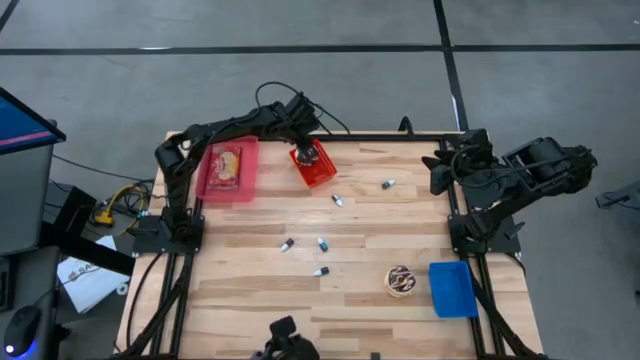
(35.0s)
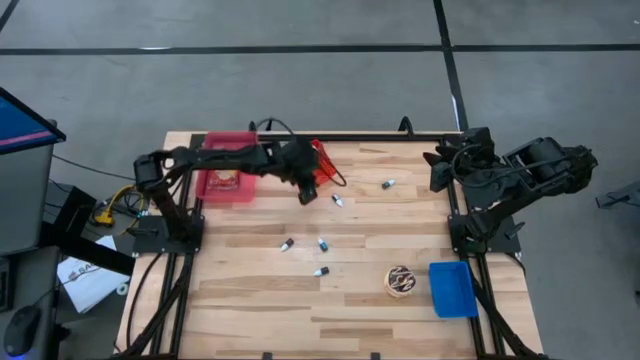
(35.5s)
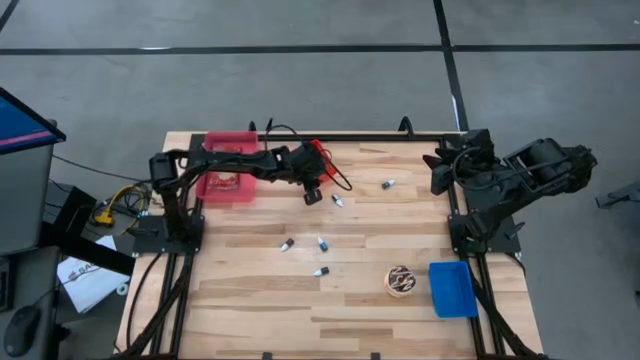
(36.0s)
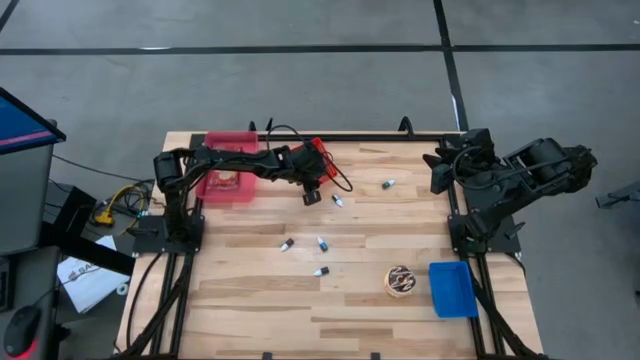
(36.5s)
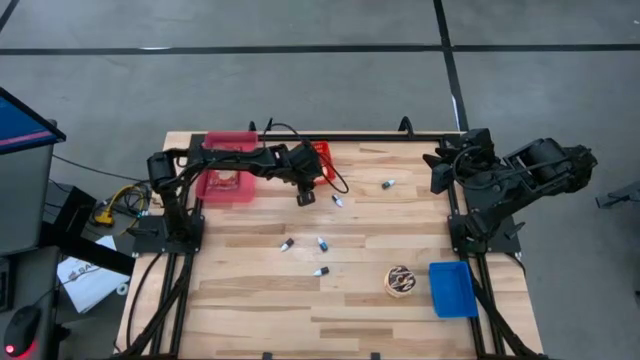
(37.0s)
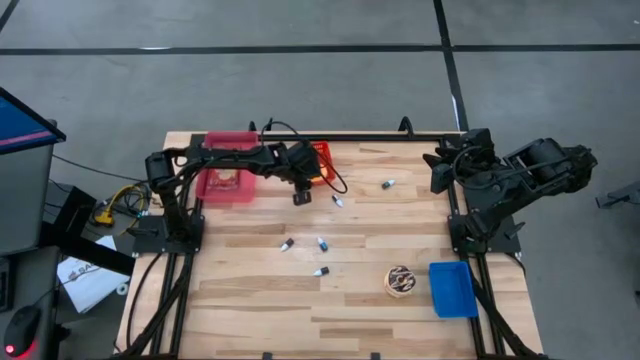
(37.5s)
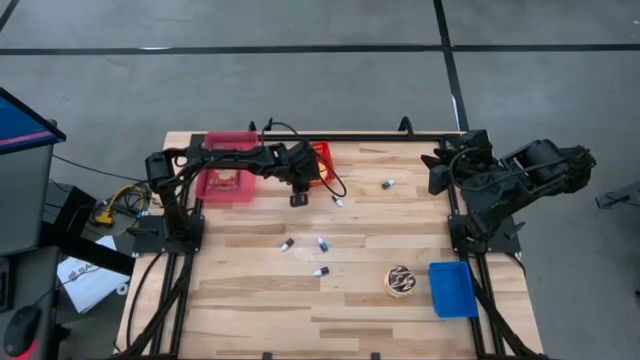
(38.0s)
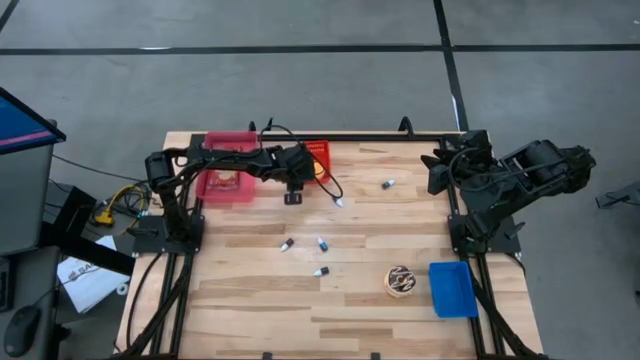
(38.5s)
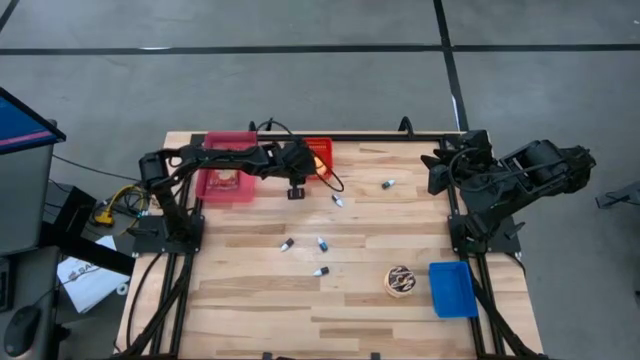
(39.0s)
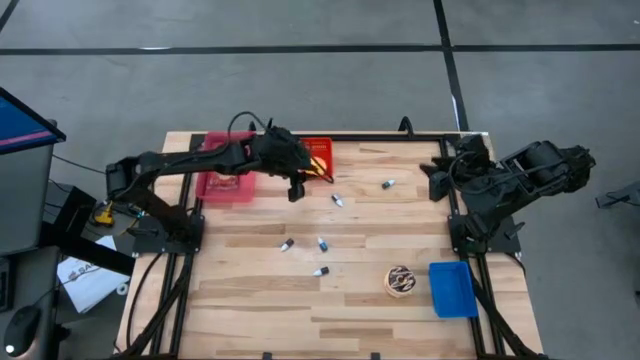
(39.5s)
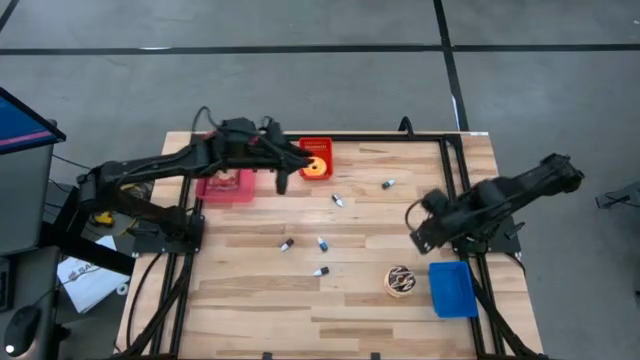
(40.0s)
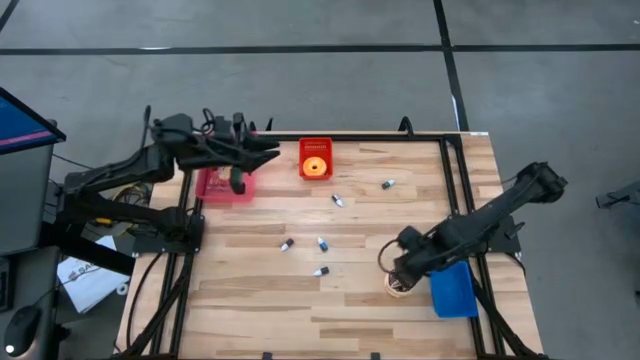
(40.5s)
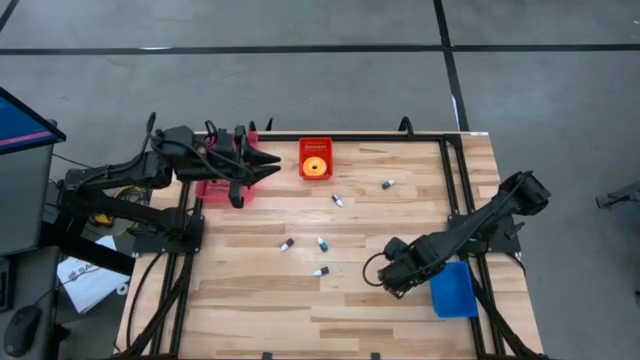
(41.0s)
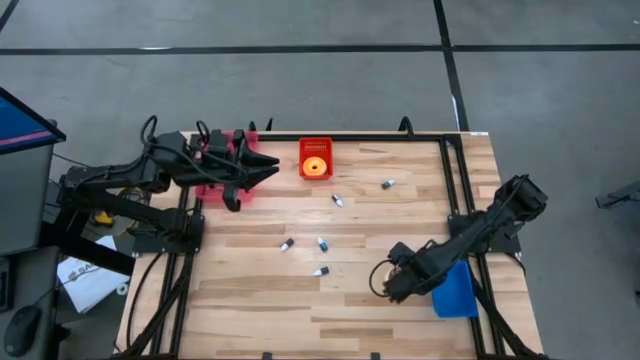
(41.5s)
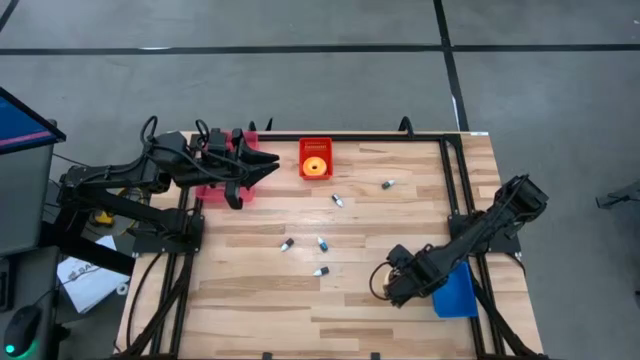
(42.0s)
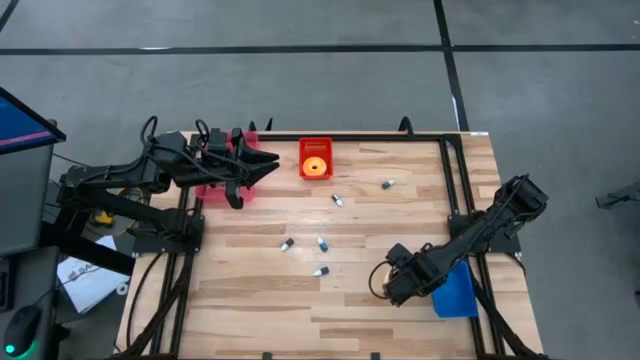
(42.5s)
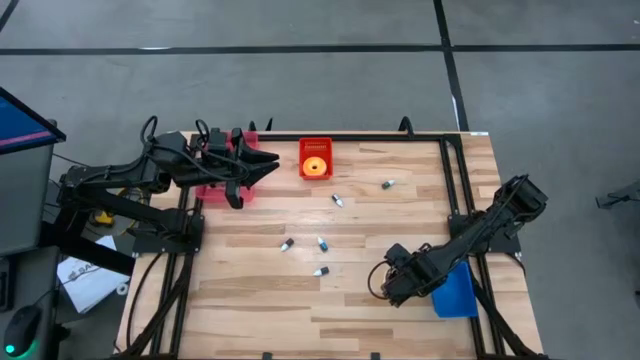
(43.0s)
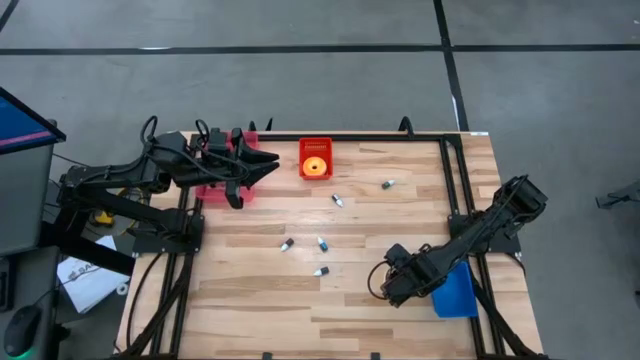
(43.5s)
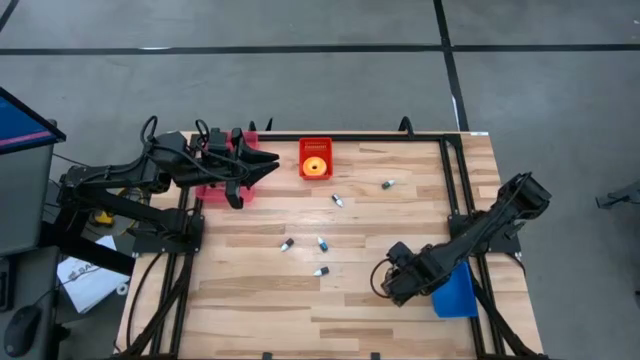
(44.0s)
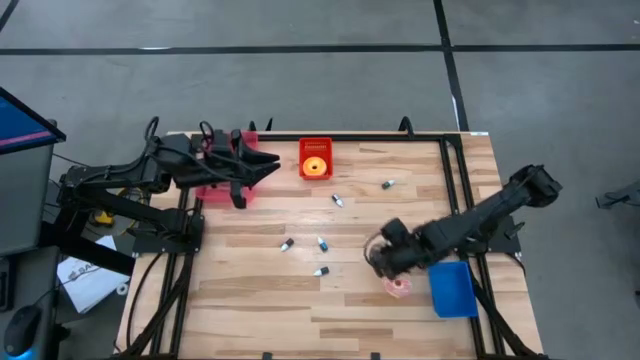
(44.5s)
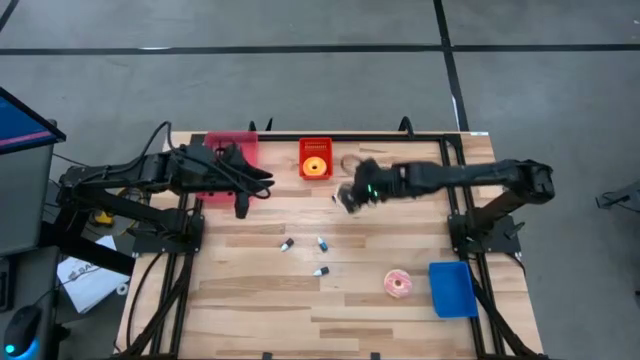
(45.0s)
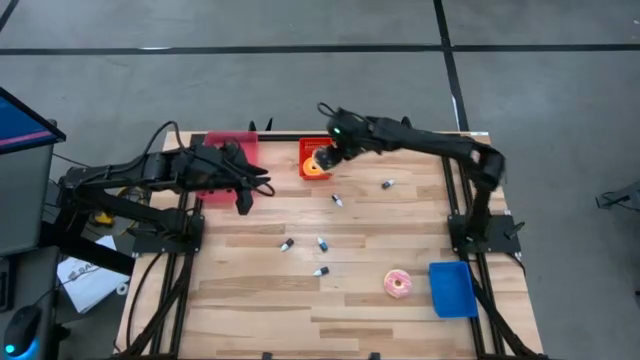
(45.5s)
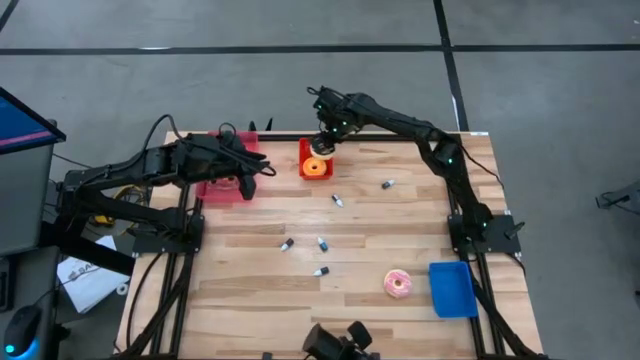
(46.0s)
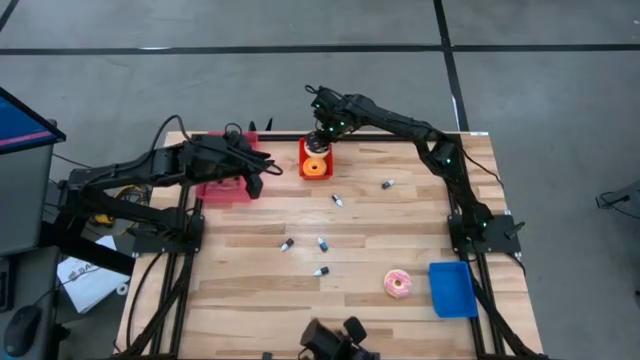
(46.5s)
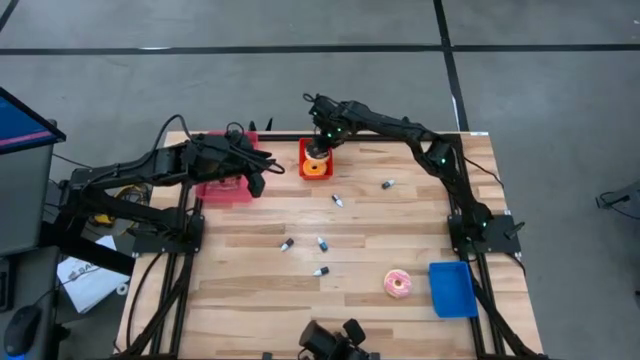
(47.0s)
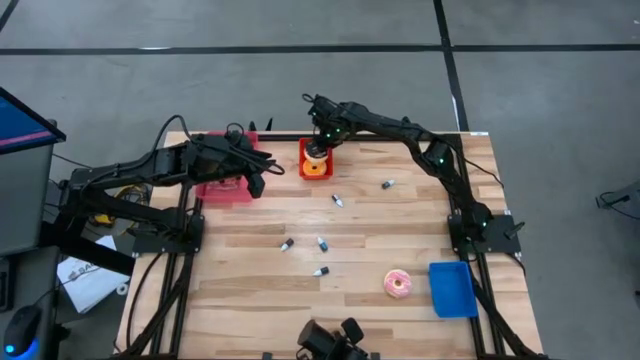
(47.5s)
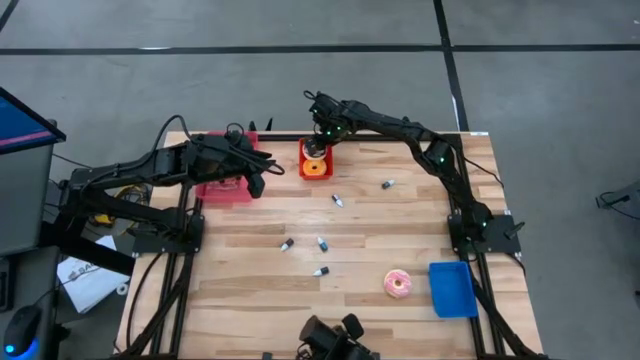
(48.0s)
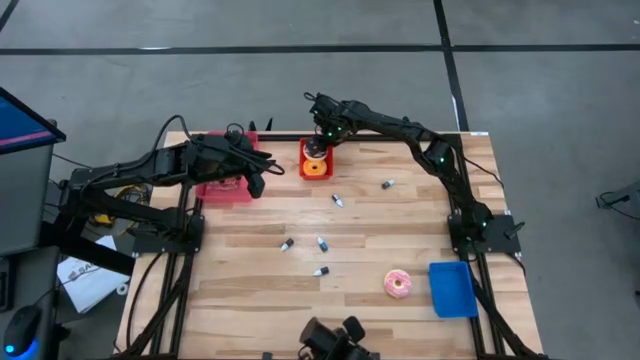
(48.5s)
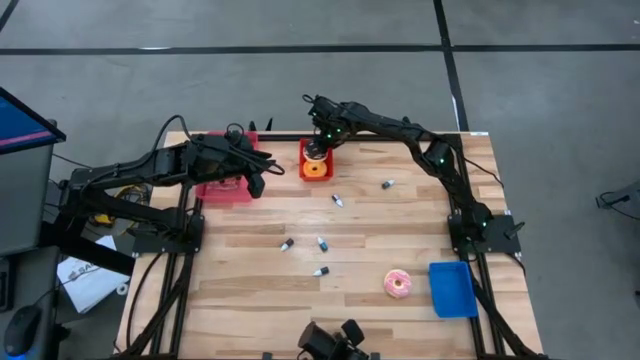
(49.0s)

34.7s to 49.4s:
Put the black donut into the red bin
